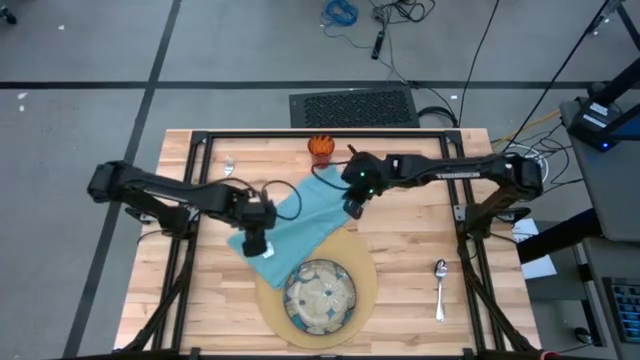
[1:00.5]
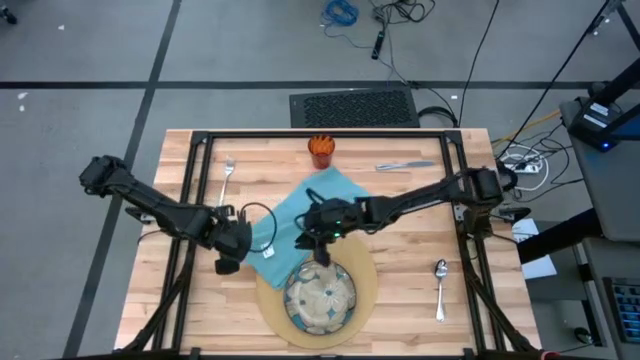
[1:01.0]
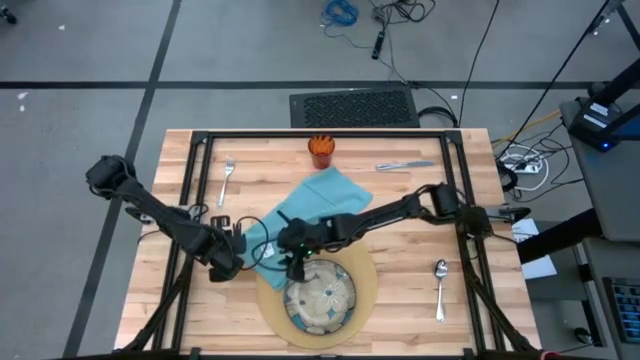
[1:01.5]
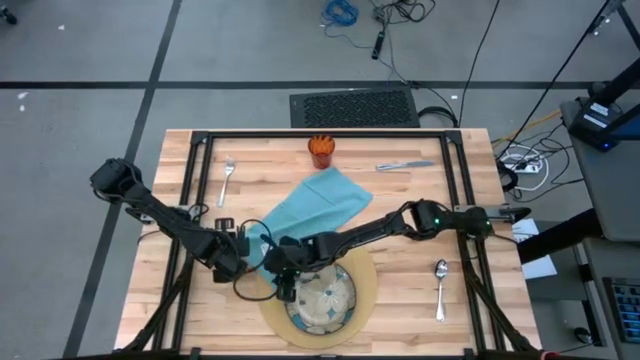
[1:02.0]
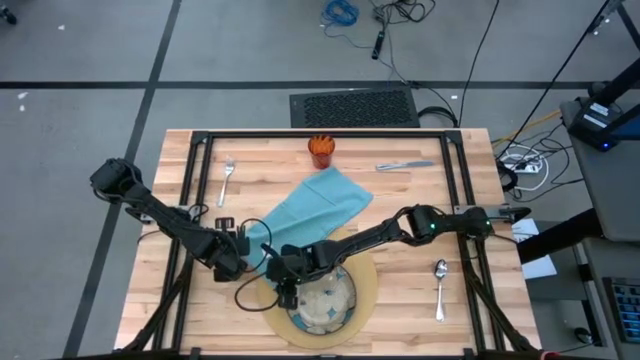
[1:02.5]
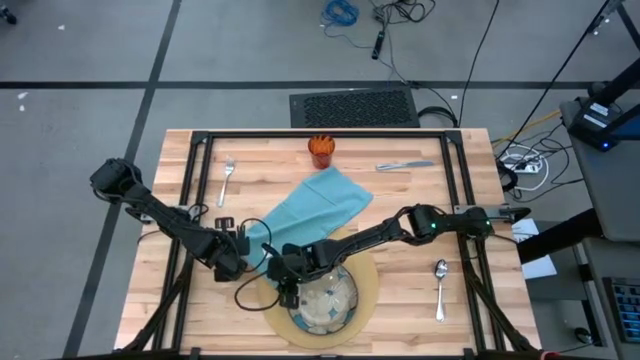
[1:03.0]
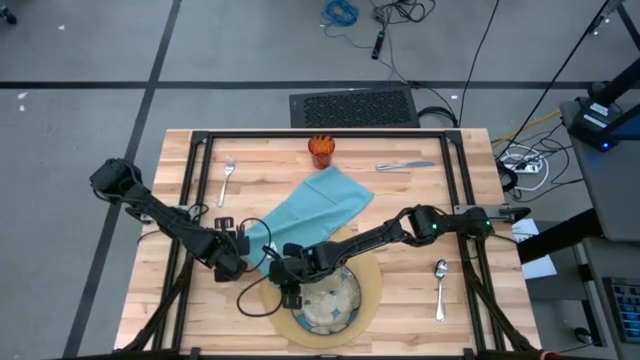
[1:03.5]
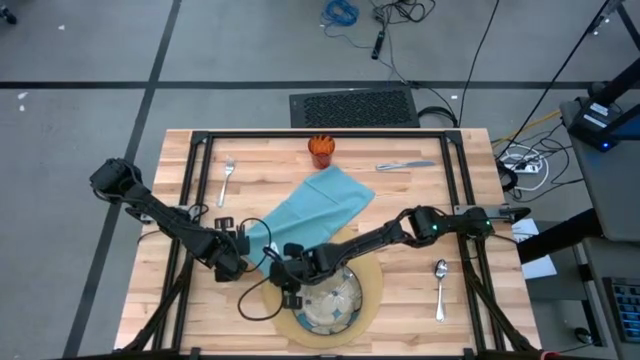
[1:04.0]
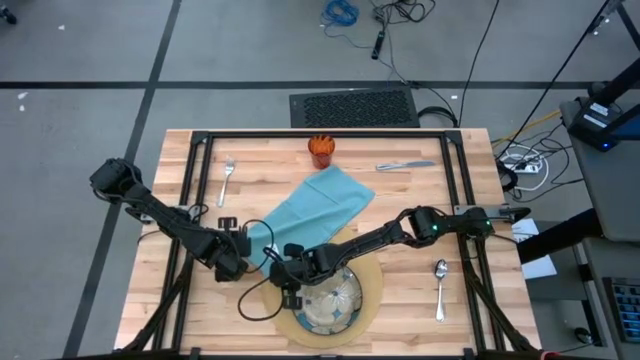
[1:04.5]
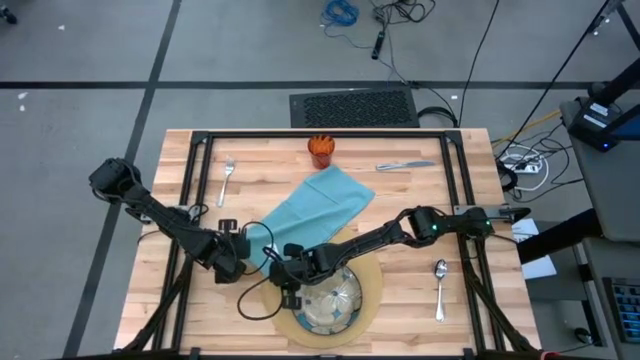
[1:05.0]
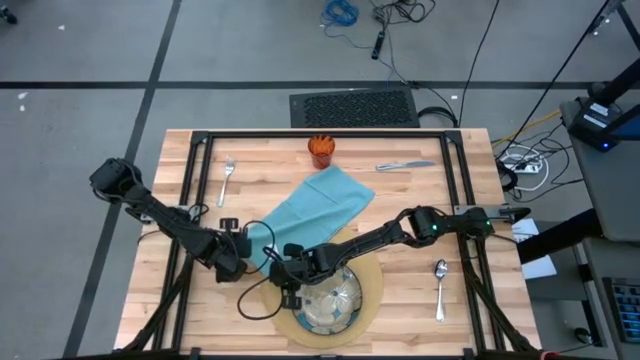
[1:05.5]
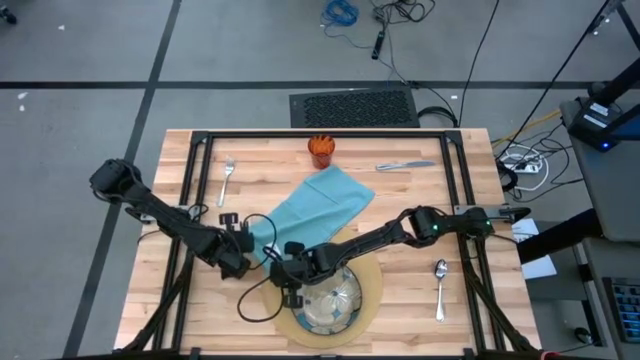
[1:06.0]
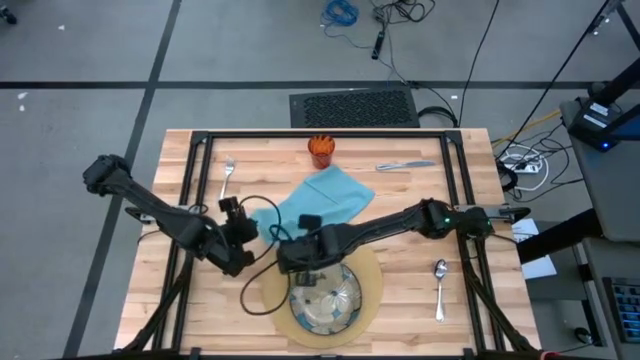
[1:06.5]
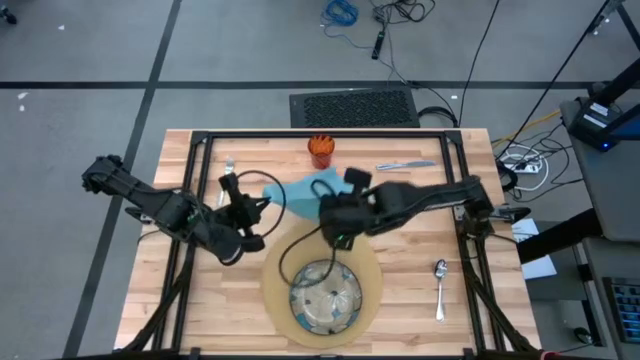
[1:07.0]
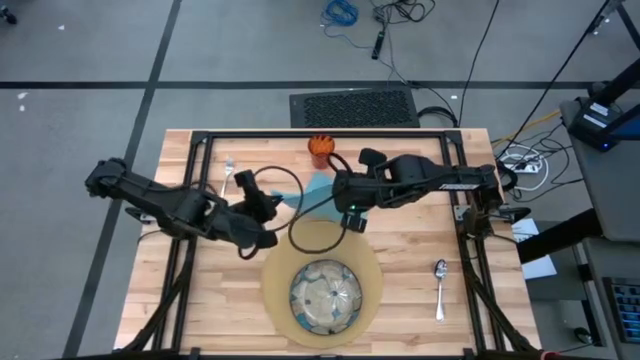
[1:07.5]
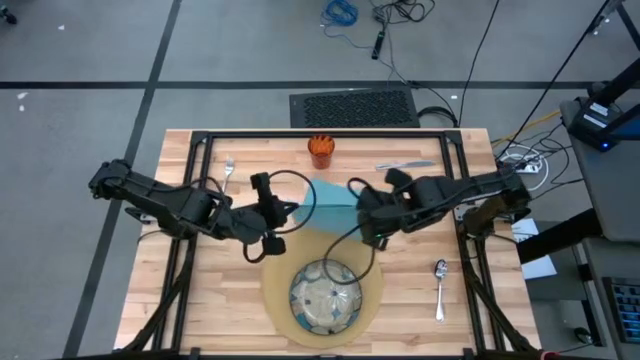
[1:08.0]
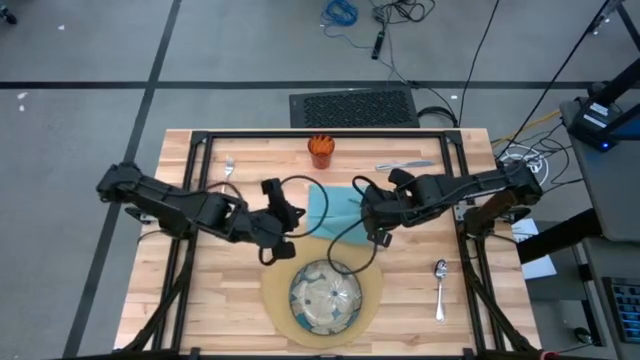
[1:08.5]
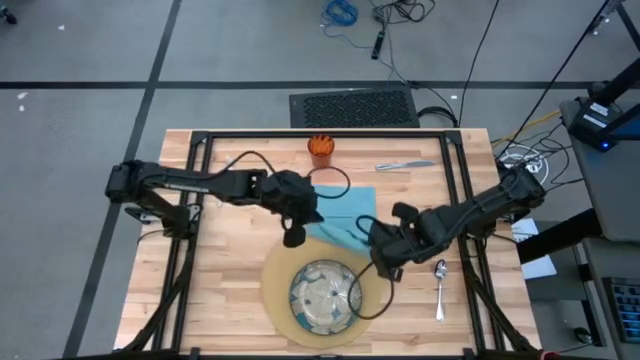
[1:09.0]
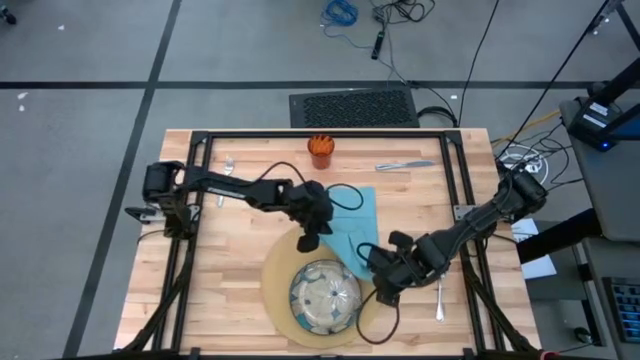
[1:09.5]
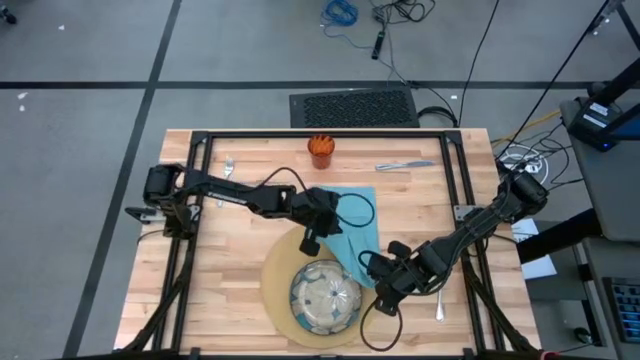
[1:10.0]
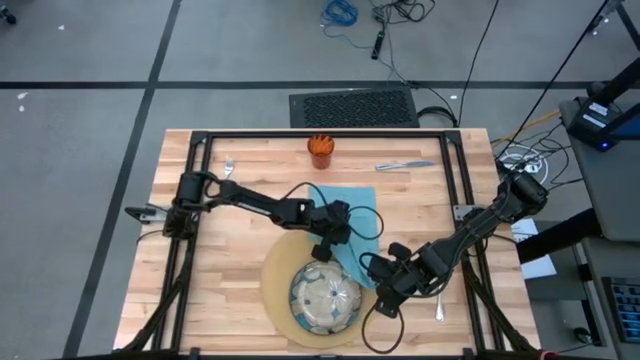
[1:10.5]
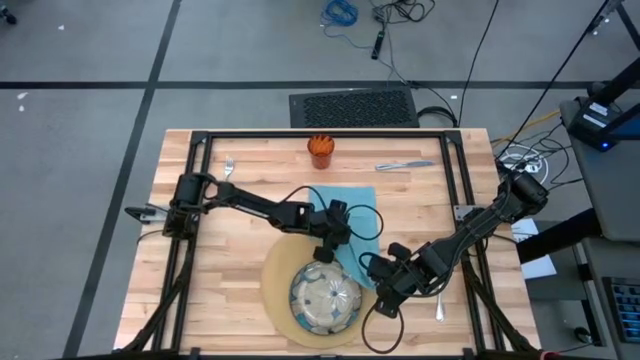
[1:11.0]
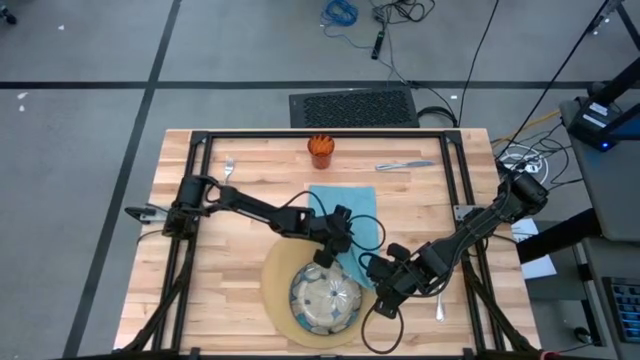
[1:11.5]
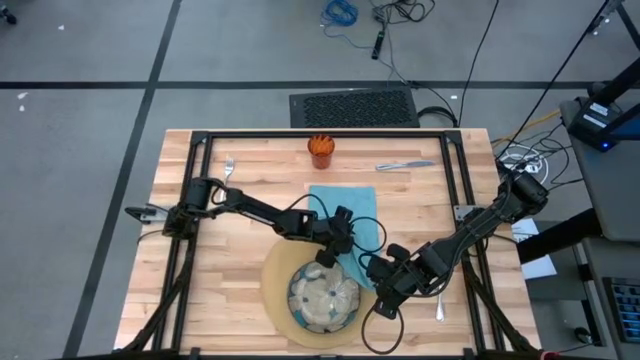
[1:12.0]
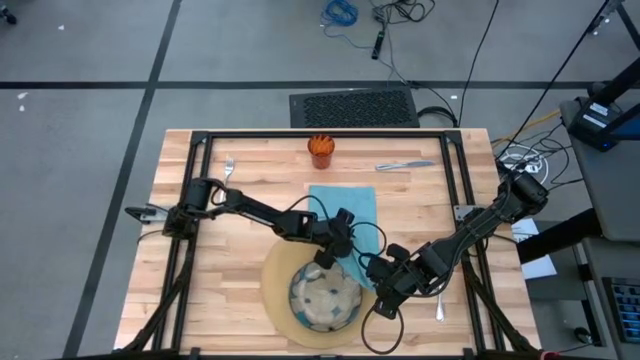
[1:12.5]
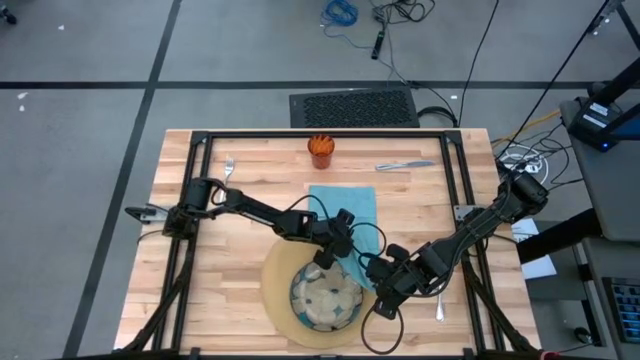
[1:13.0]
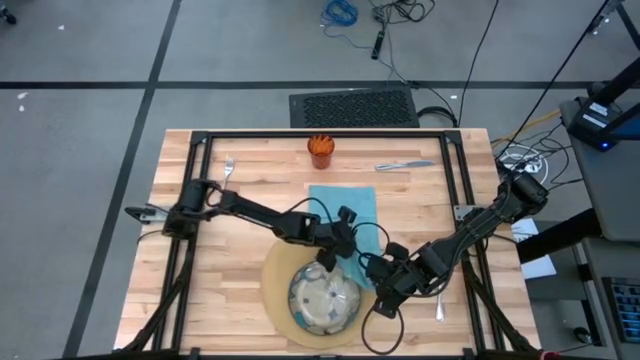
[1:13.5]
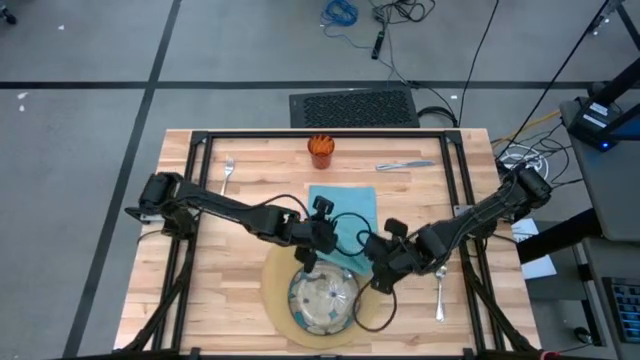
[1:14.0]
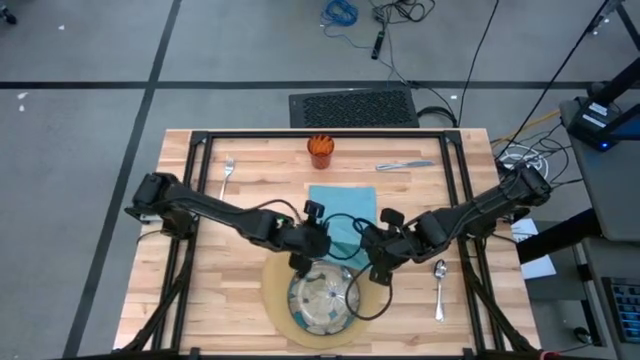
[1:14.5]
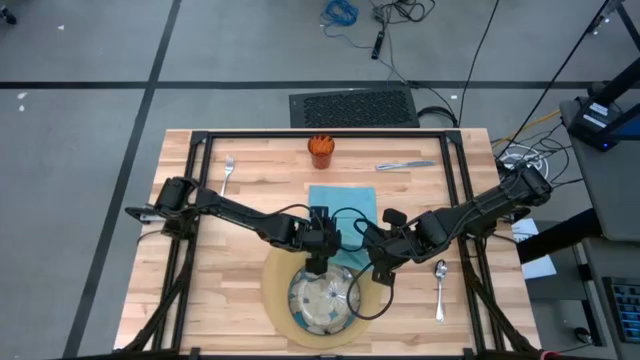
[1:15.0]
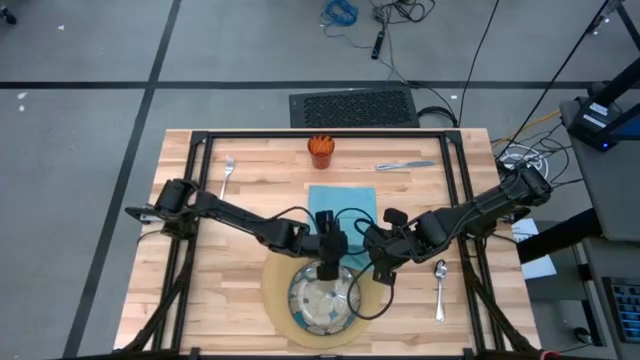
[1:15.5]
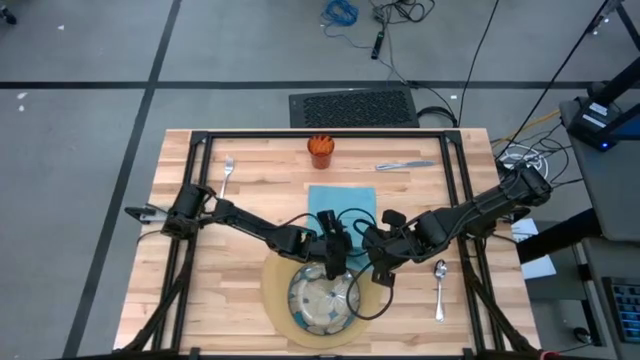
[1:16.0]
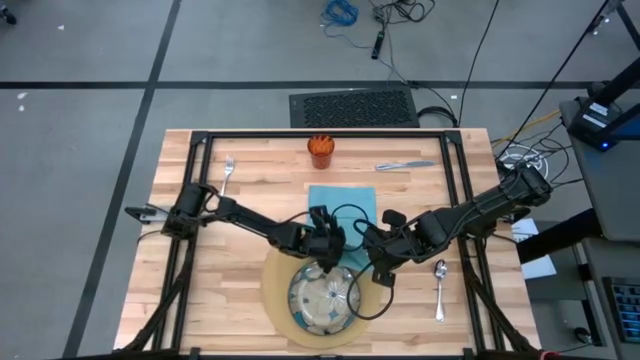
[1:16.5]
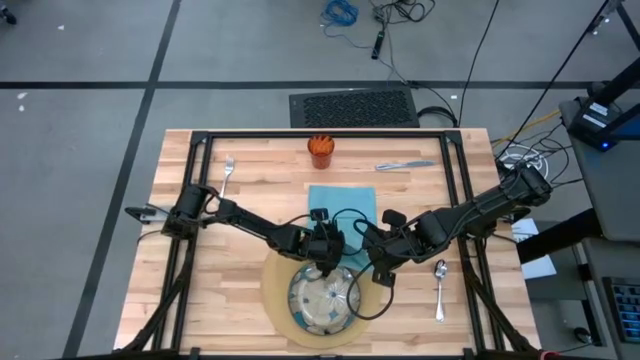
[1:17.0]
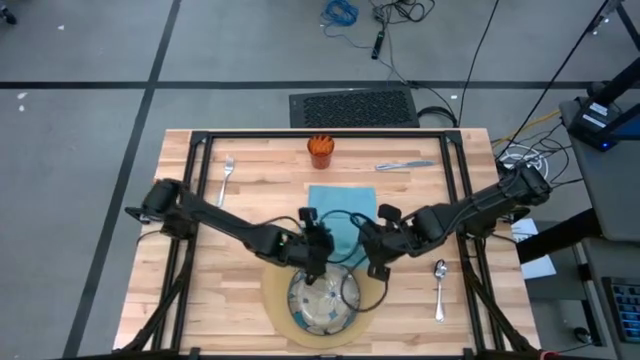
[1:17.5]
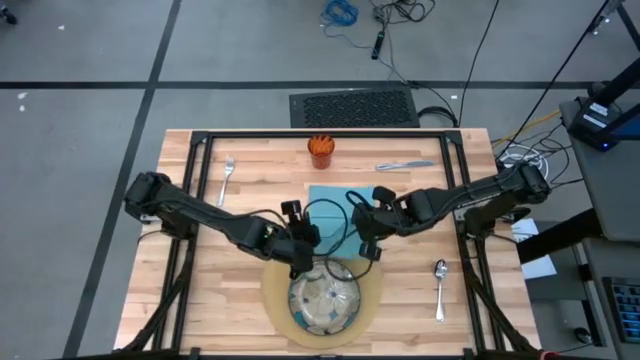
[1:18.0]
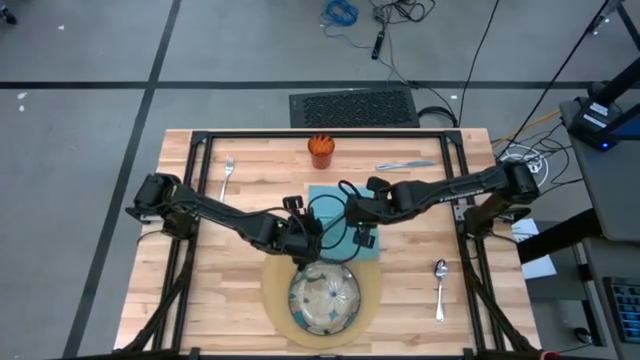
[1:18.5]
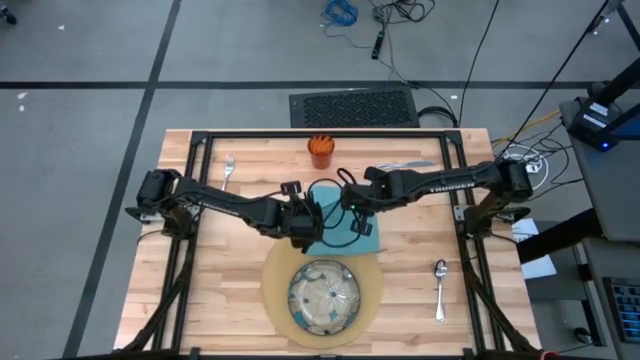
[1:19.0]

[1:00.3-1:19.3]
Task: Set table place
Fold the blue table napkin
